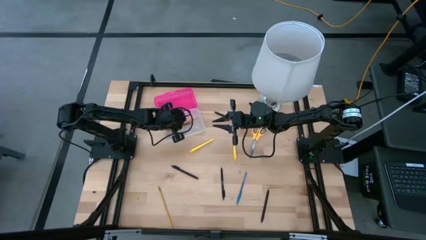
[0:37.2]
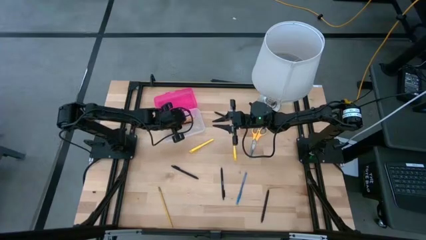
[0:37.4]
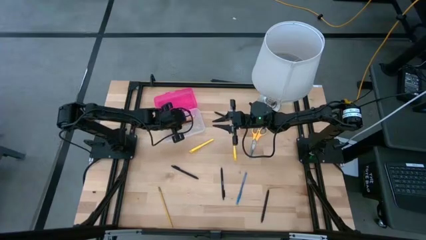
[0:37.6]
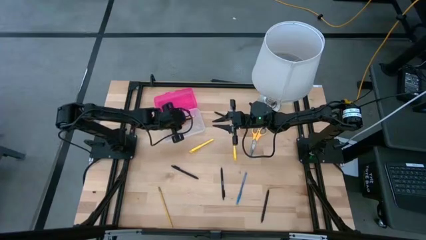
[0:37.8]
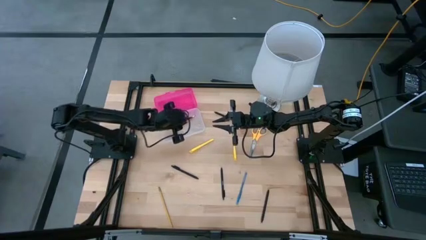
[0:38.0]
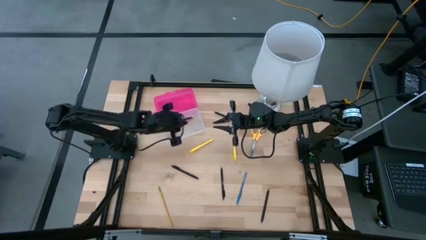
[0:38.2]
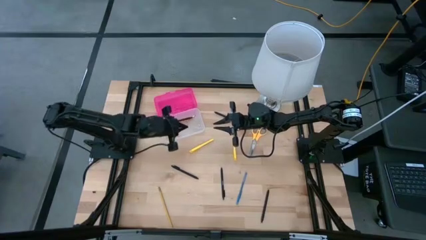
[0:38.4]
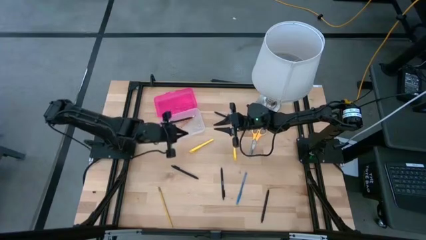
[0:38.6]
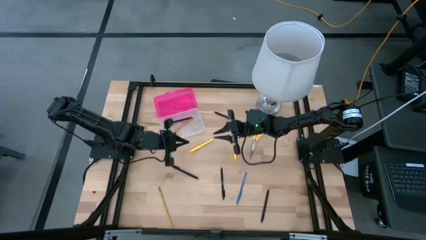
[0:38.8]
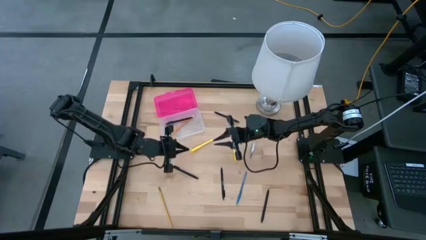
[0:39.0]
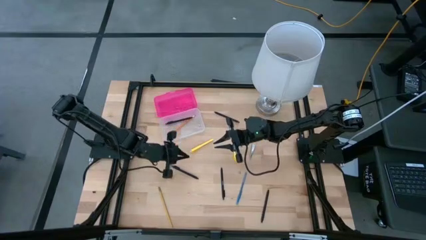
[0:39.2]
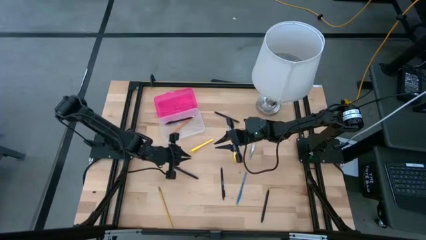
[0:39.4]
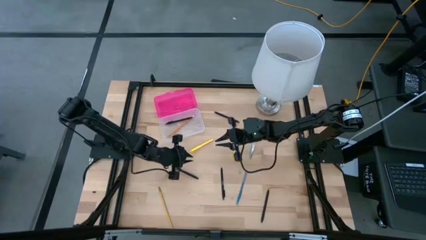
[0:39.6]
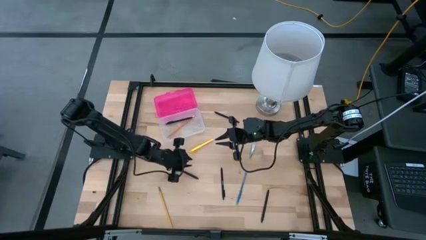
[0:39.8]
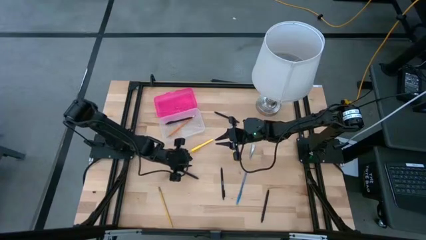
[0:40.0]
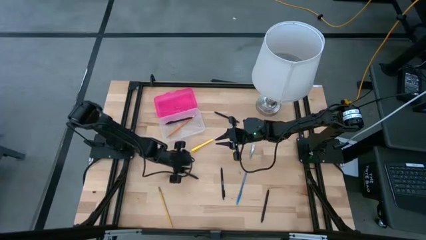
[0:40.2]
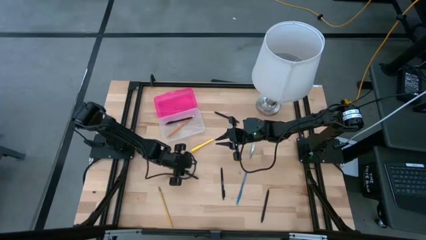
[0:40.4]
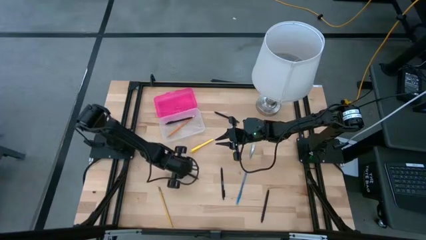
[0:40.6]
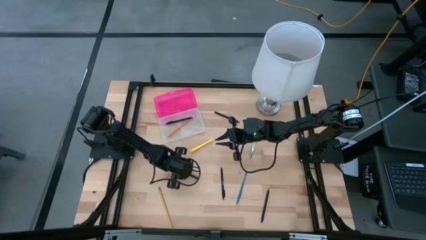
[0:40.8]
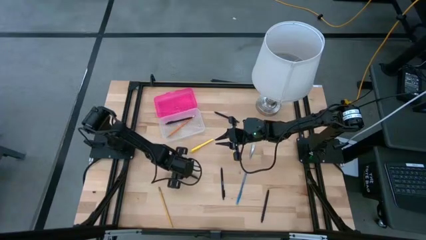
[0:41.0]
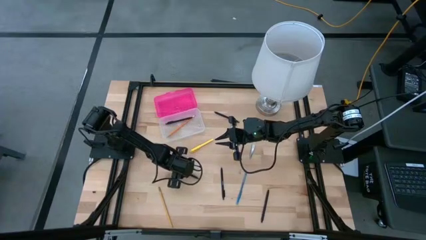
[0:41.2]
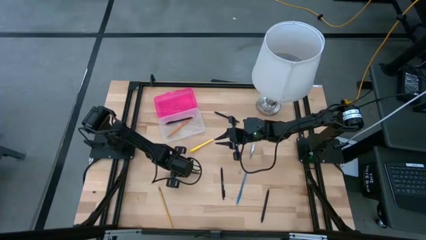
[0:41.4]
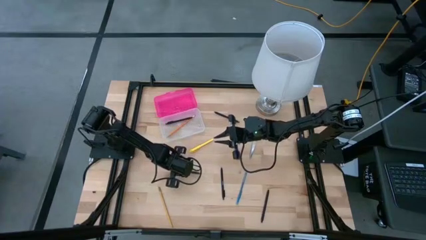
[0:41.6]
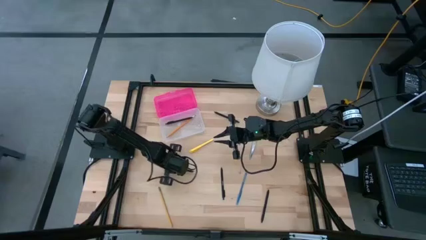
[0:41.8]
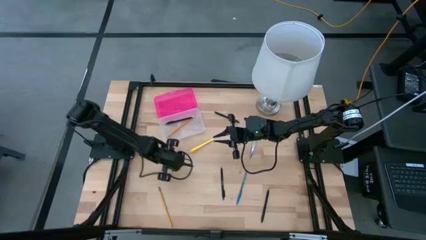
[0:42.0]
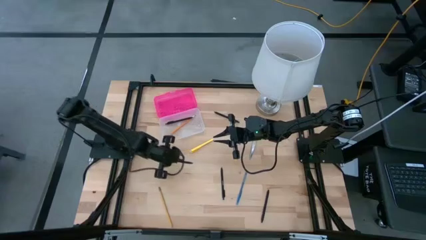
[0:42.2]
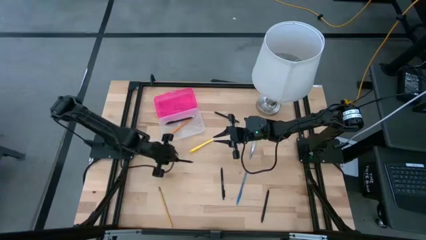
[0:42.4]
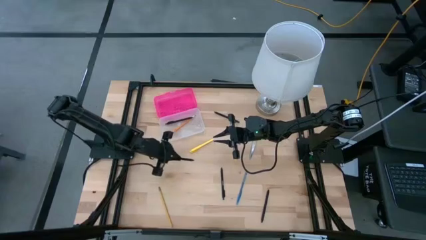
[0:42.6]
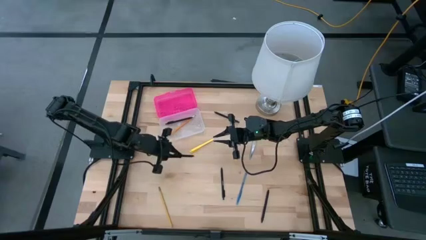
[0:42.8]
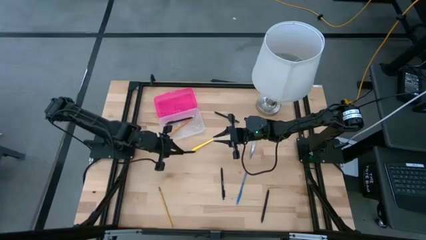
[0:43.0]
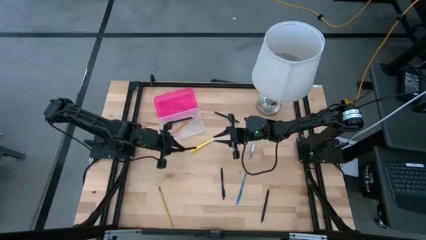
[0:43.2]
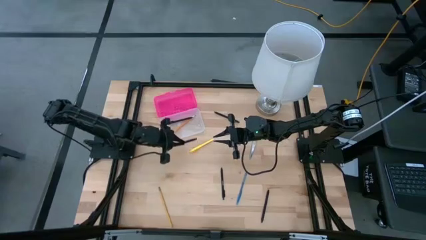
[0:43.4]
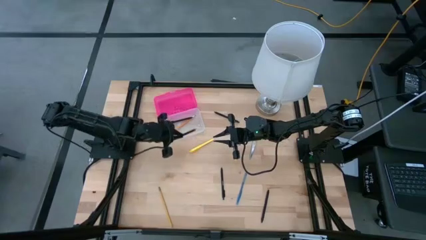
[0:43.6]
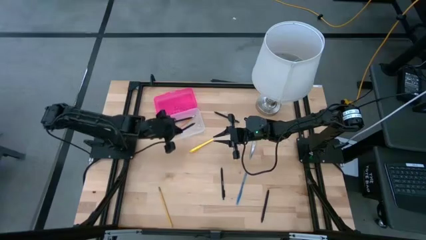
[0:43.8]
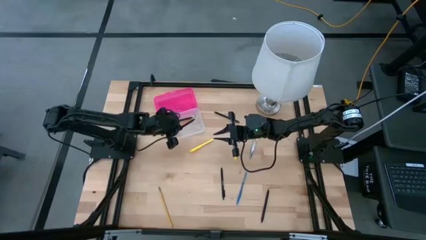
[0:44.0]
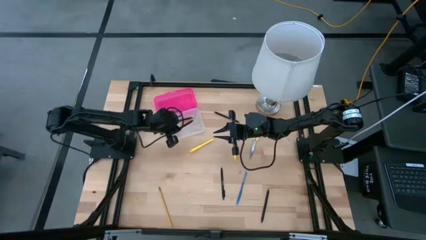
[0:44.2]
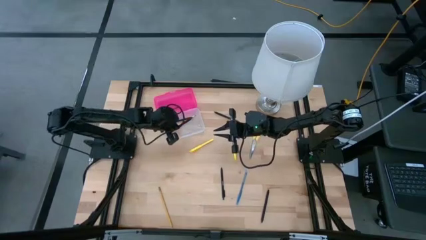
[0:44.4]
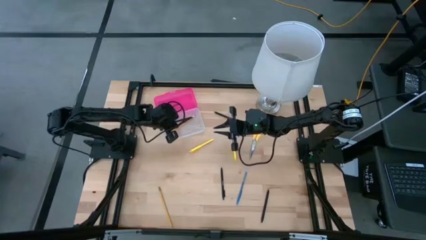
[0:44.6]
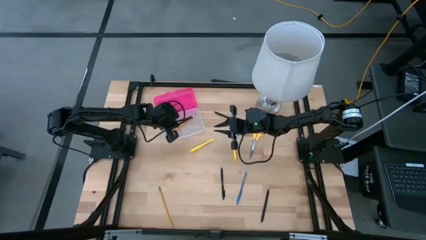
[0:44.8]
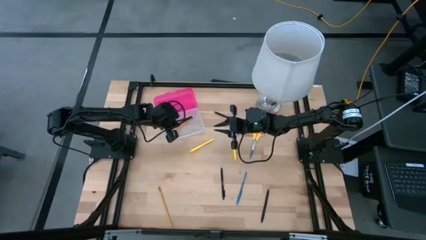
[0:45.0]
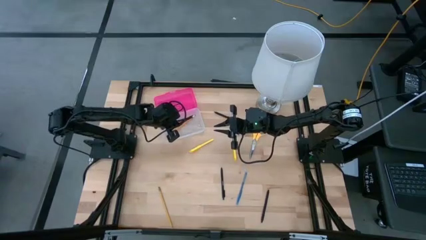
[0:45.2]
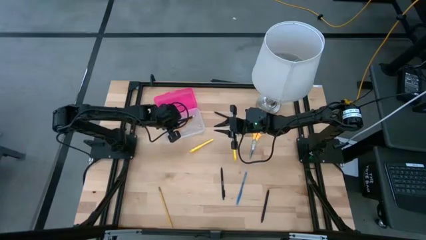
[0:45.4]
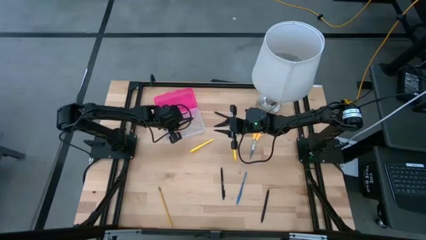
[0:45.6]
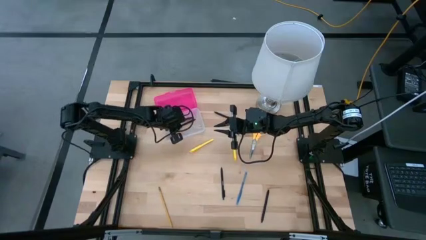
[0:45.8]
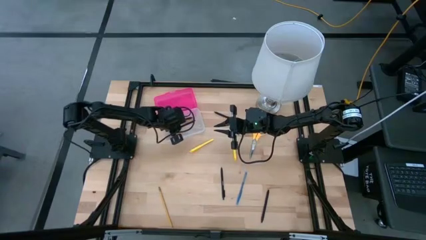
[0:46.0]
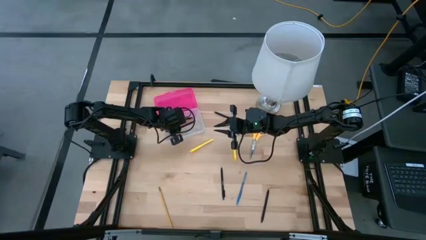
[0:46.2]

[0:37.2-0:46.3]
Task: Pick & place school supplies into a supply box
Put the black pen into the pink supply box

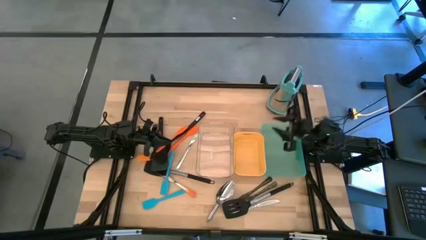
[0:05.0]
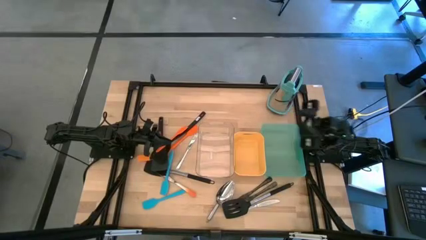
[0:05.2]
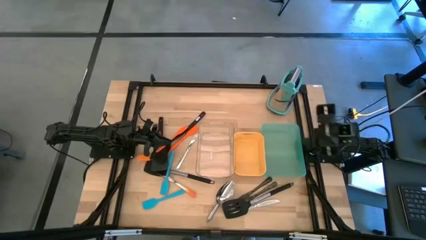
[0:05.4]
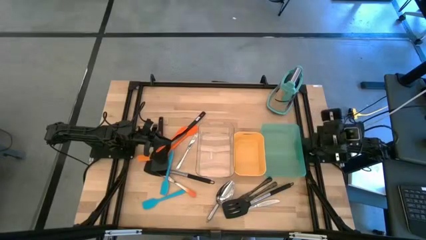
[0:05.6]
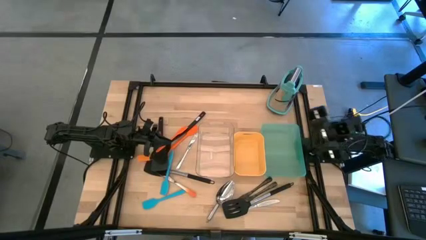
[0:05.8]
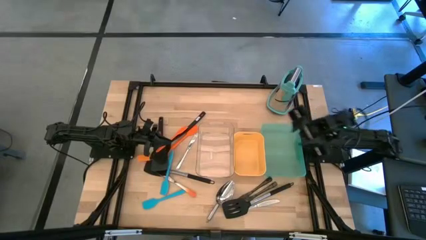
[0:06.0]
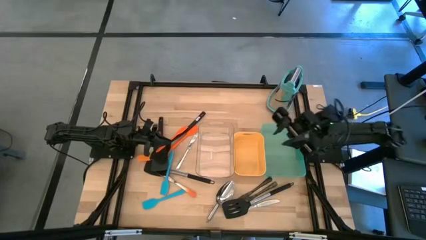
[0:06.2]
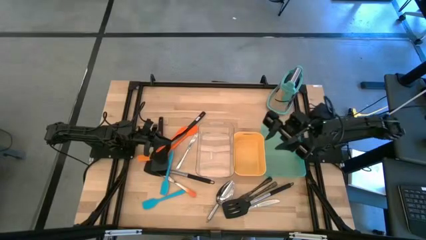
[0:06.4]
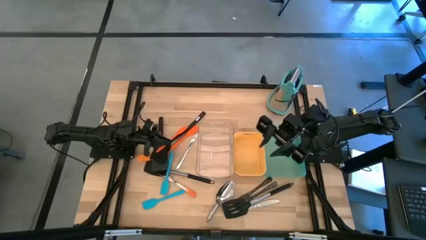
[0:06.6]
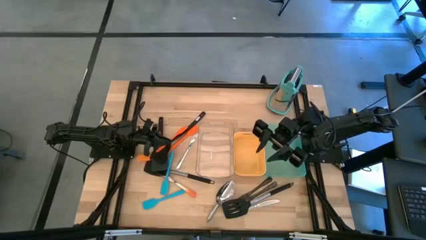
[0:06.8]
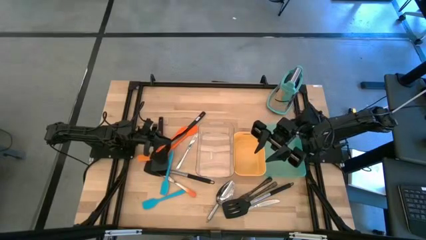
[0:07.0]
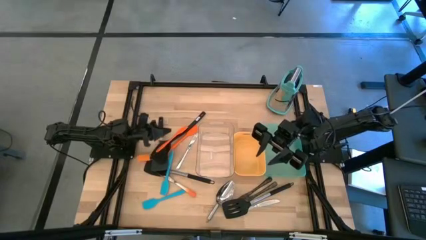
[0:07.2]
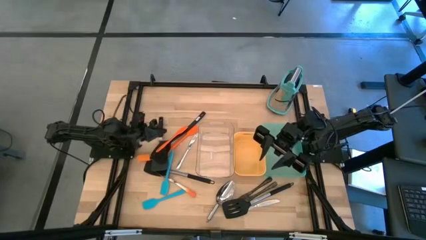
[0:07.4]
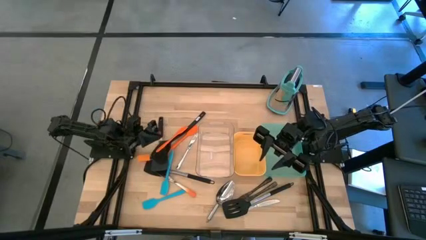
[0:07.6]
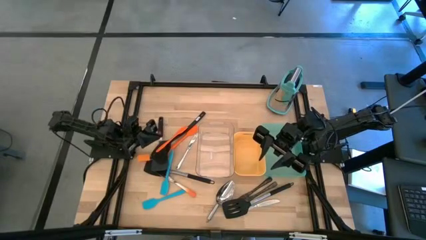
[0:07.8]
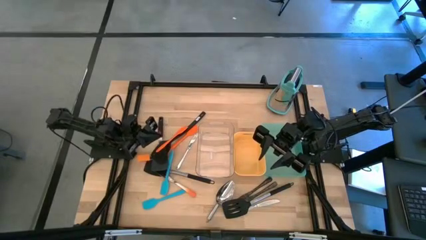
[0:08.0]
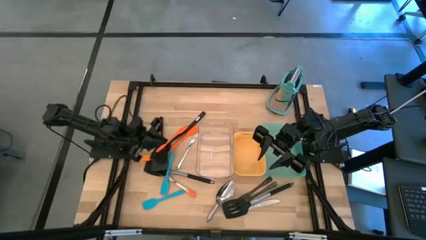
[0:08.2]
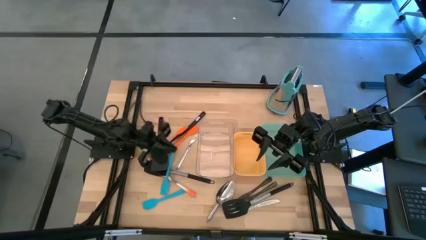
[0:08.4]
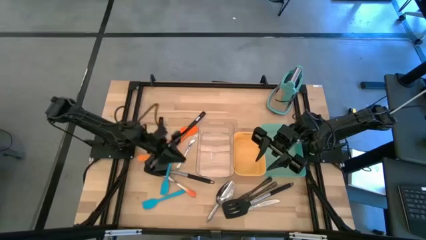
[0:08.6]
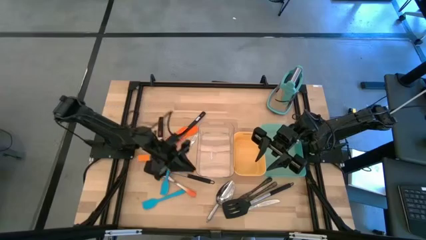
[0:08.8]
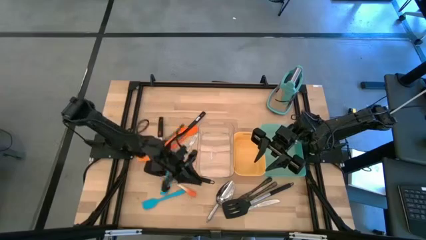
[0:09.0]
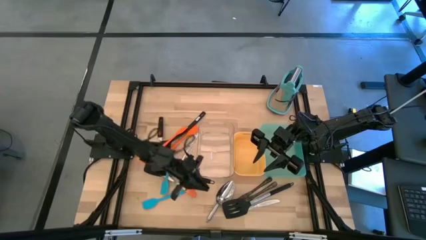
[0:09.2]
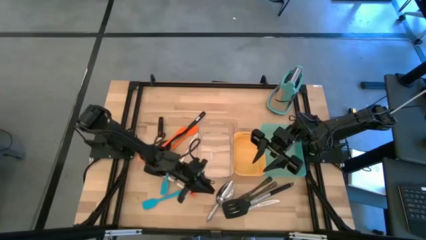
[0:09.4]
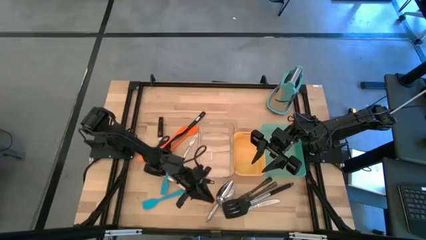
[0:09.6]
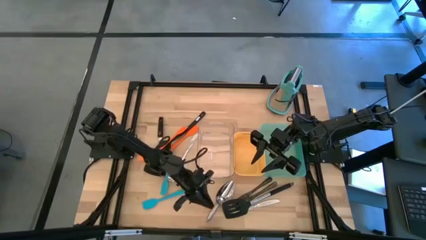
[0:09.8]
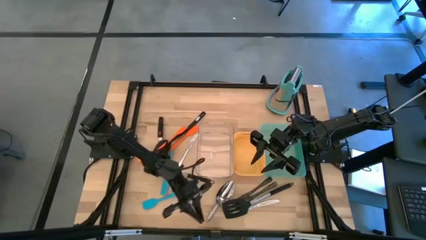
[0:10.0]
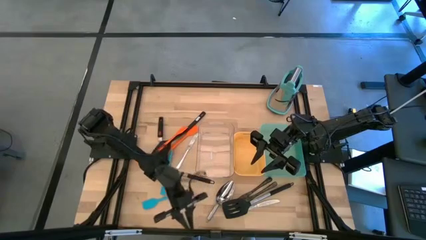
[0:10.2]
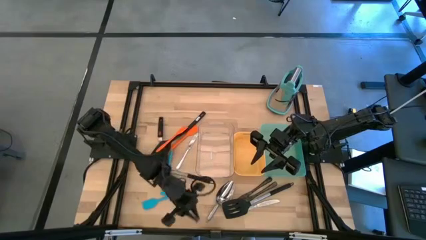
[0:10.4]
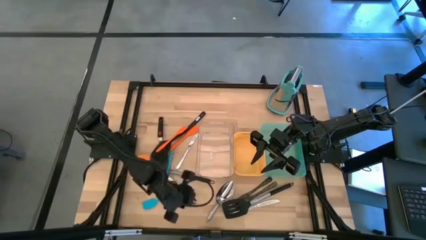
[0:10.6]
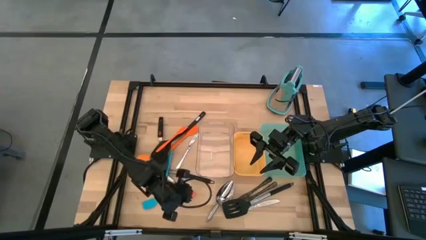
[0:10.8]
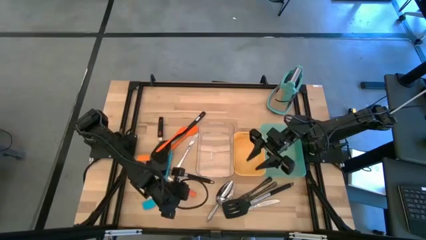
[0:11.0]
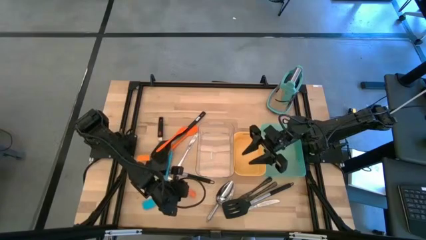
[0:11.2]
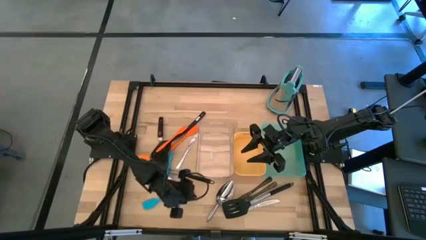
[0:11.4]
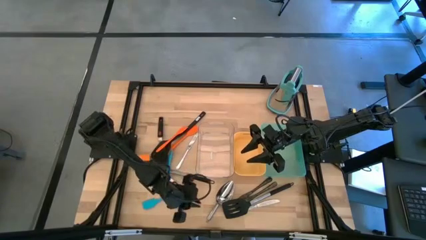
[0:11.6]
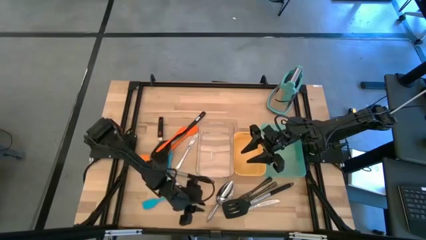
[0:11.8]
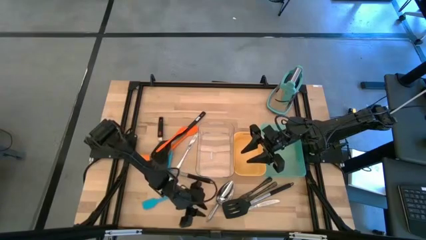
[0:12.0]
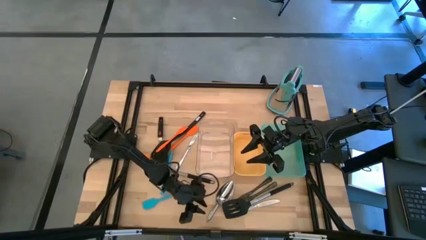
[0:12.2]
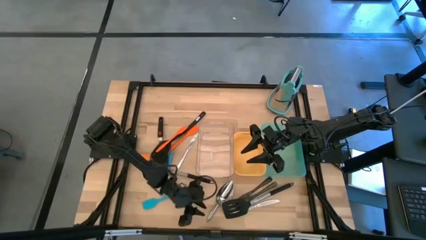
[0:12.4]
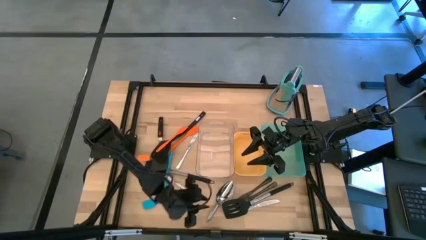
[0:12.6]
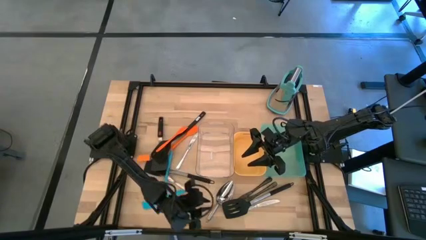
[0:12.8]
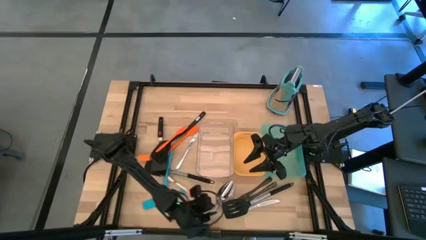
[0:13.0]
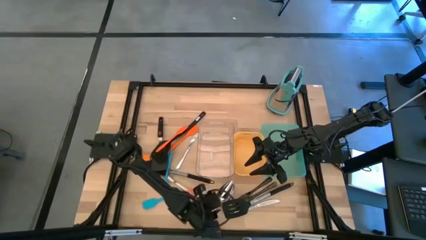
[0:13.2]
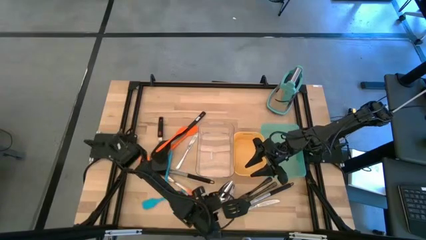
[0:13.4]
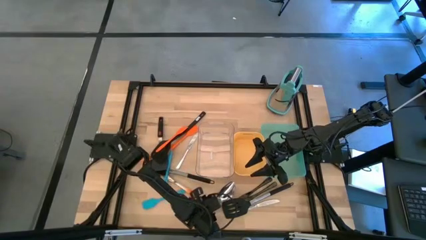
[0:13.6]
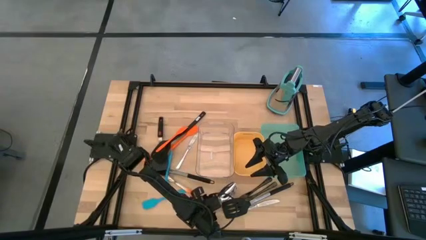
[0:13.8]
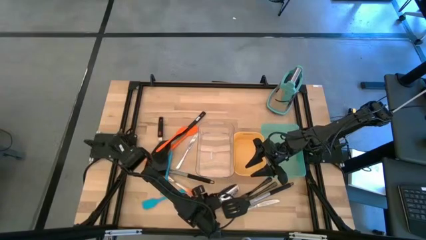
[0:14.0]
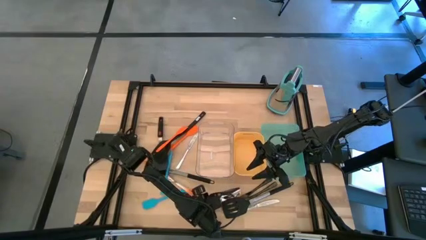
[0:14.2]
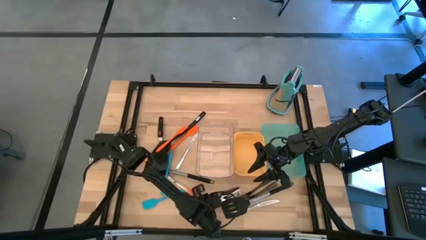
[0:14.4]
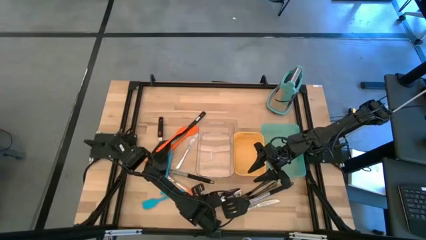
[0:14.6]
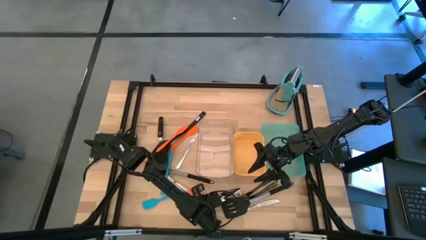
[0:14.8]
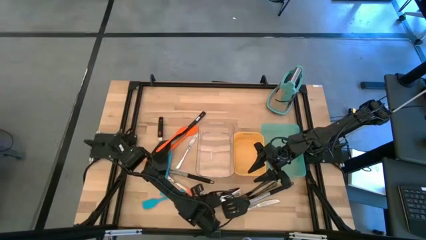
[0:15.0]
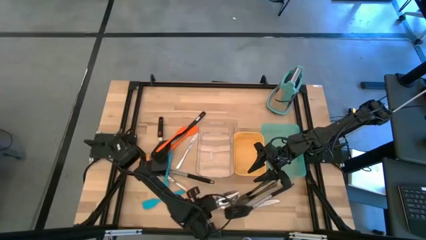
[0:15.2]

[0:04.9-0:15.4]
Task: Pick & Place Kitchen Items
Put the ice shovel into the green bin
